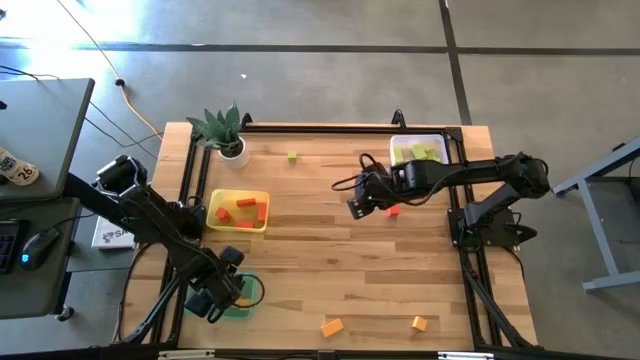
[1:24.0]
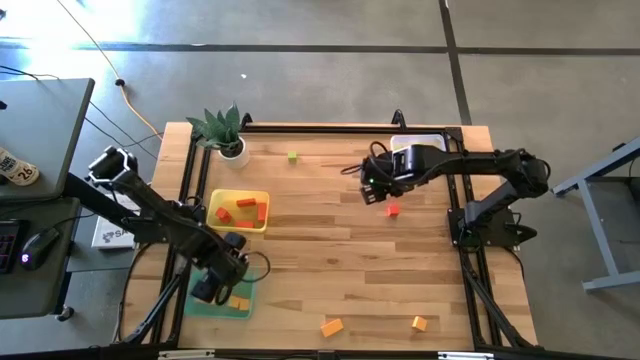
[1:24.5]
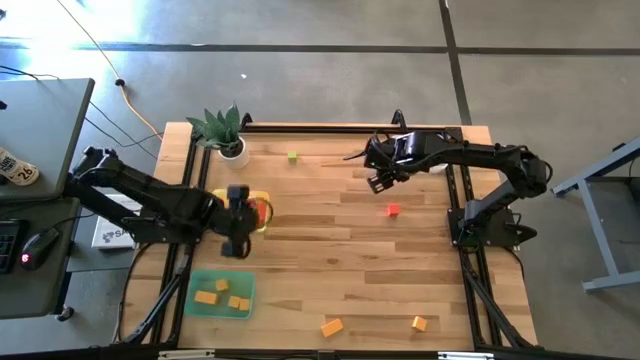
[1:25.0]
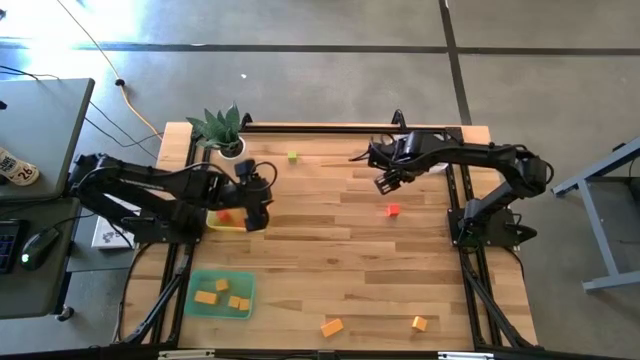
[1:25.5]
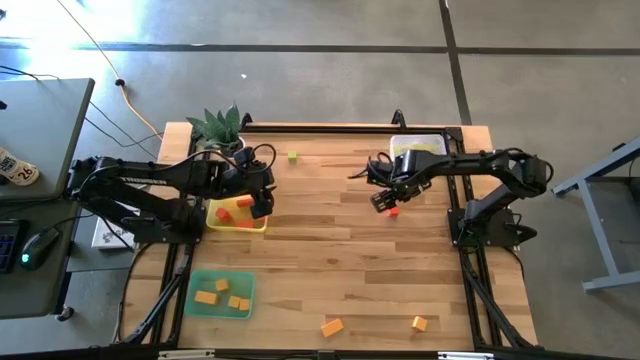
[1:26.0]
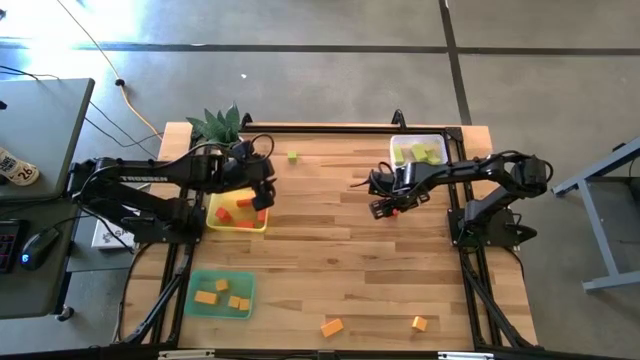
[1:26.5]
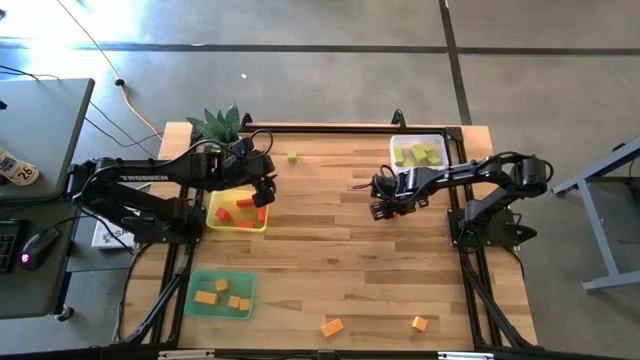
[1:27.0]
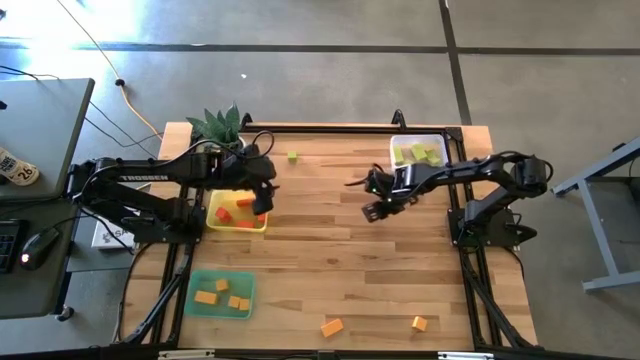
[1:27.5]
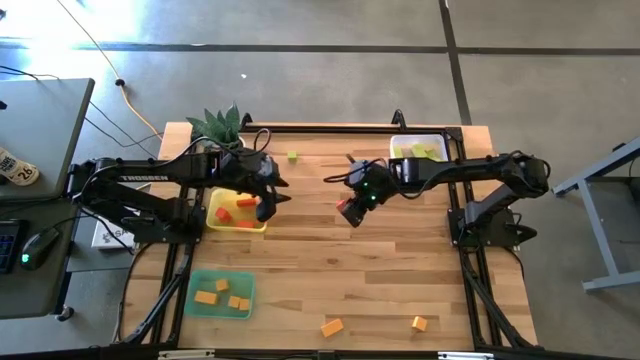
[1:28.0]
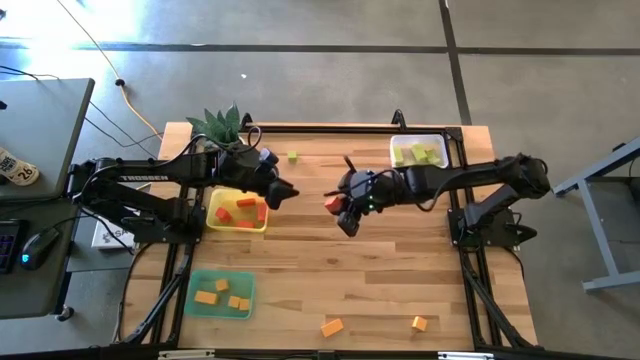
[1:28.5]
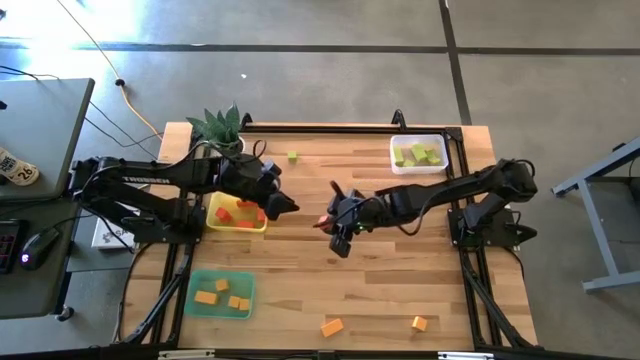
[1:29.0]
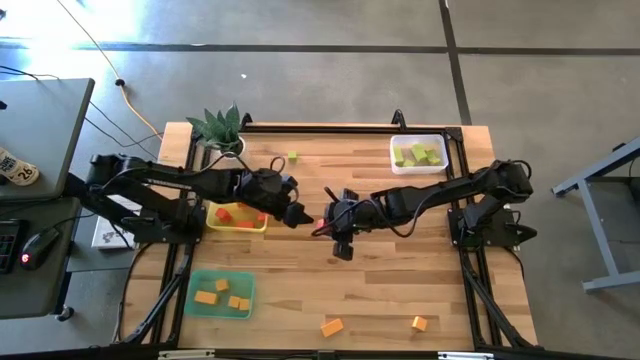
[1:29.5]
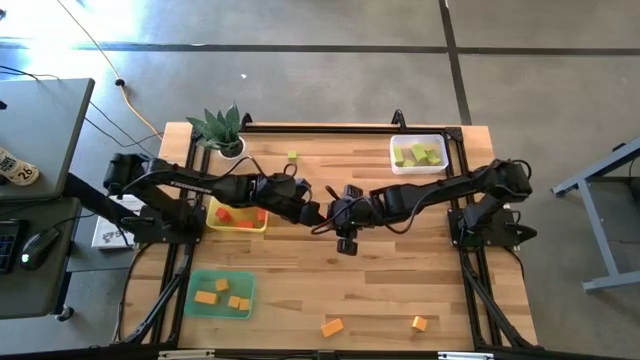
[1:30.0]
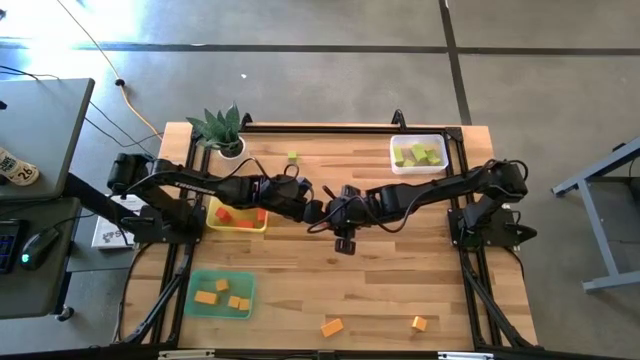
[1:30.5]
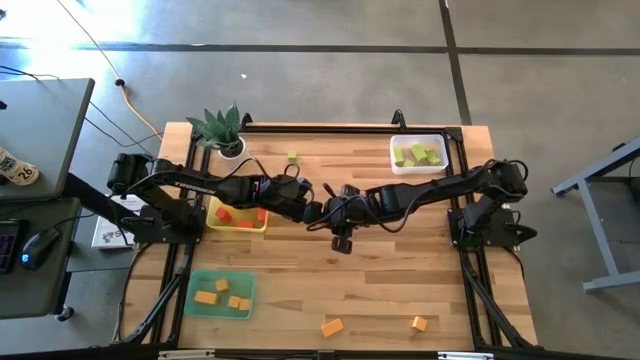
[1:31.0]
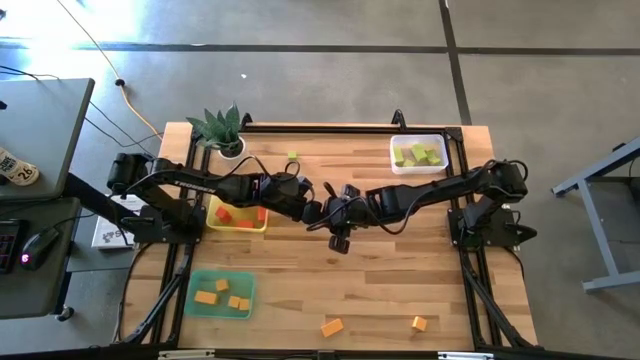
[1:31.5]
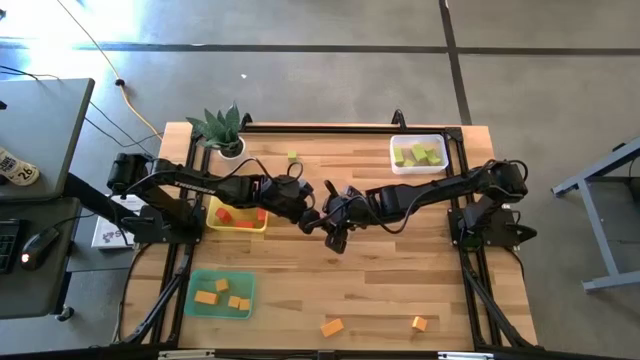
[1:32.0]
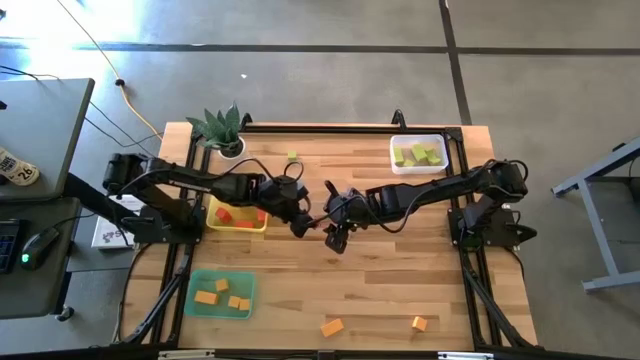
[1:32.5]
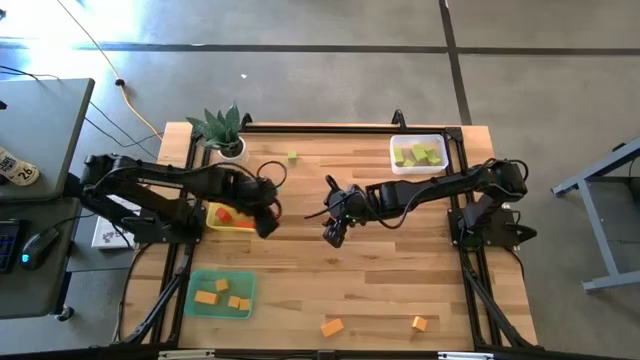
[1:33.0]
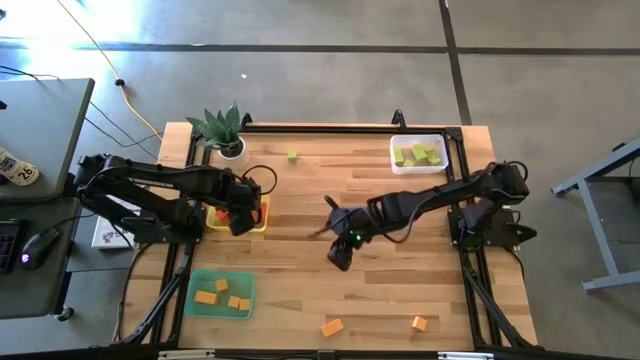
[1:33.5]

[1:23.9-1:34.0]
Task: Sort & place blocks by color
Put the orange block into the yellow bin

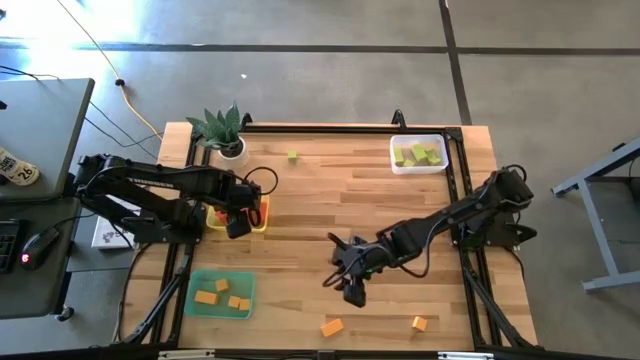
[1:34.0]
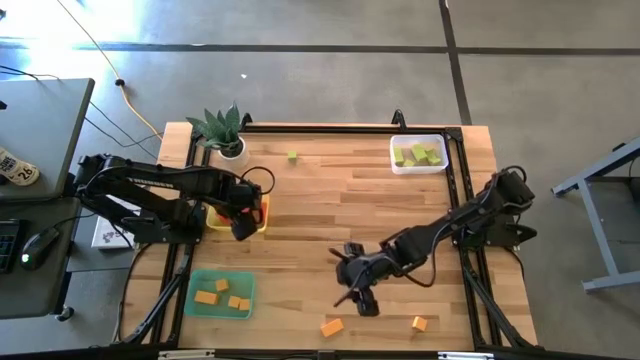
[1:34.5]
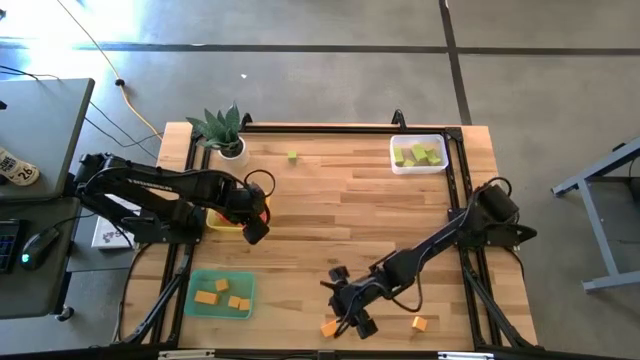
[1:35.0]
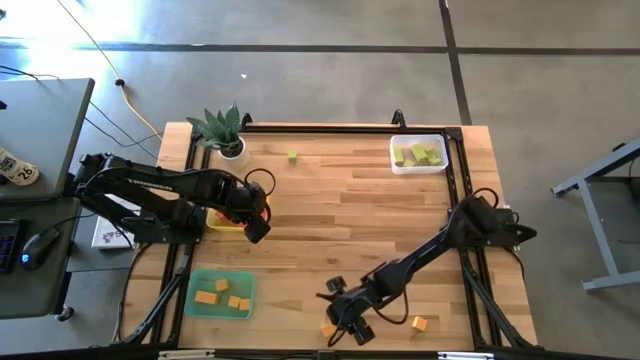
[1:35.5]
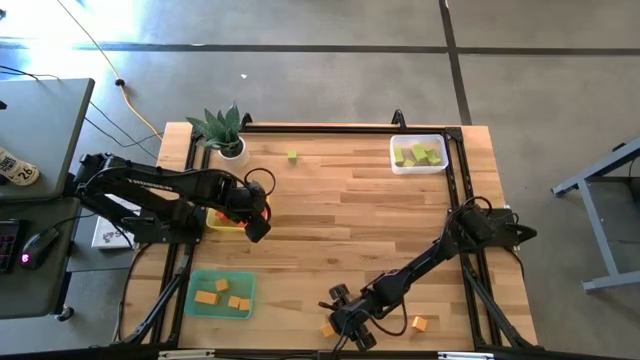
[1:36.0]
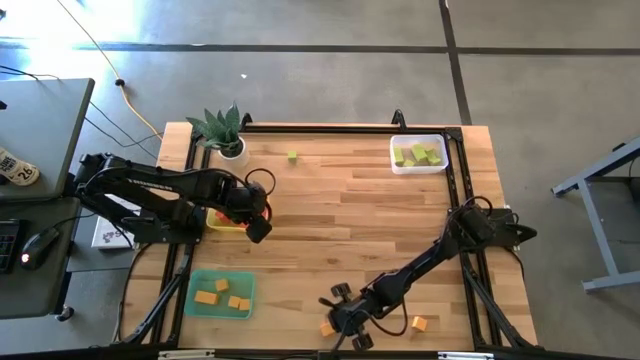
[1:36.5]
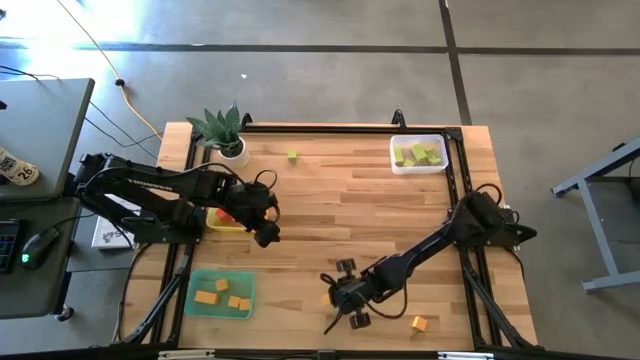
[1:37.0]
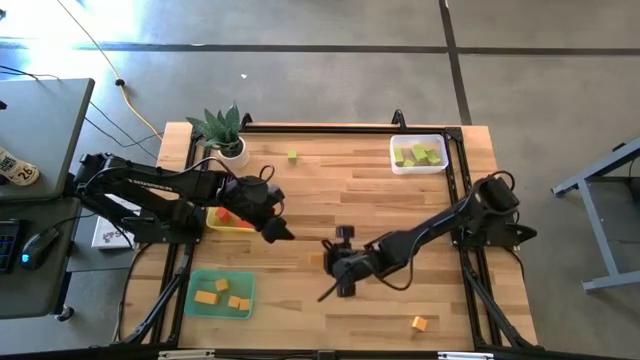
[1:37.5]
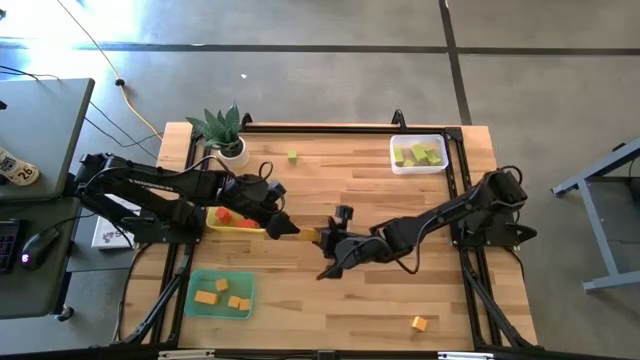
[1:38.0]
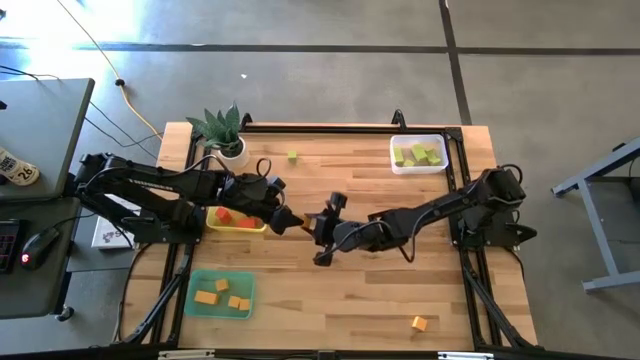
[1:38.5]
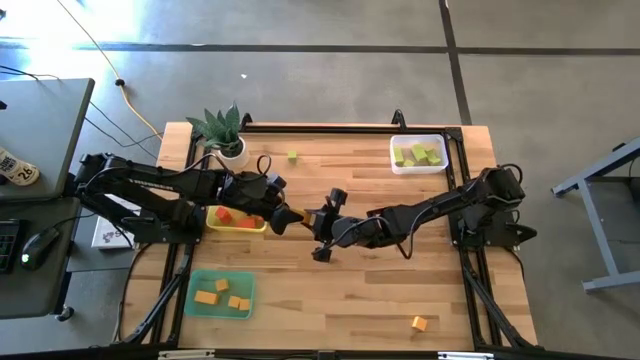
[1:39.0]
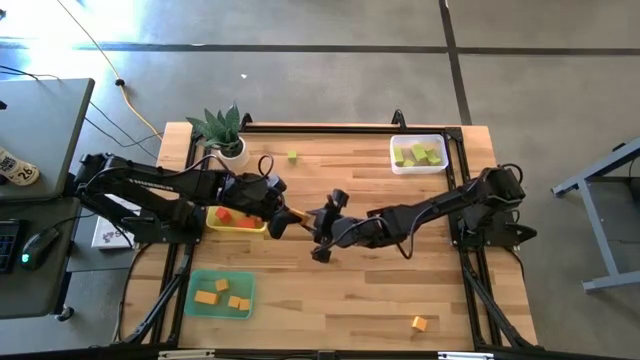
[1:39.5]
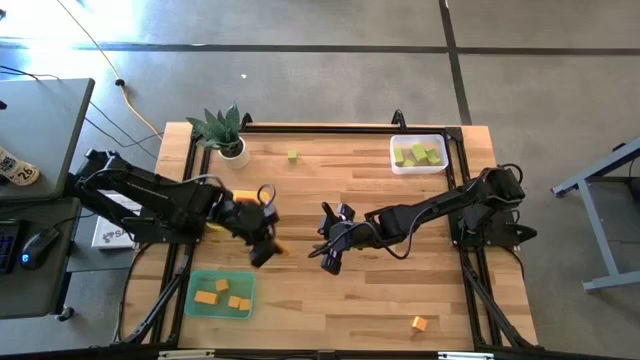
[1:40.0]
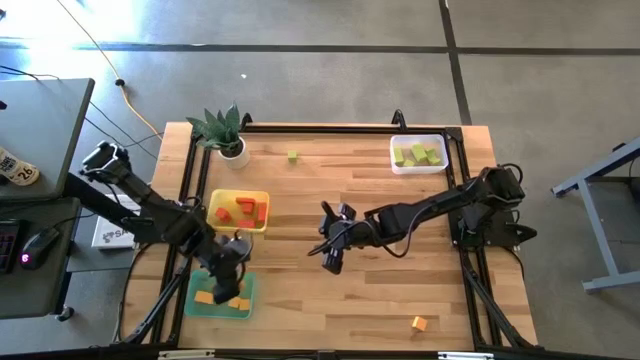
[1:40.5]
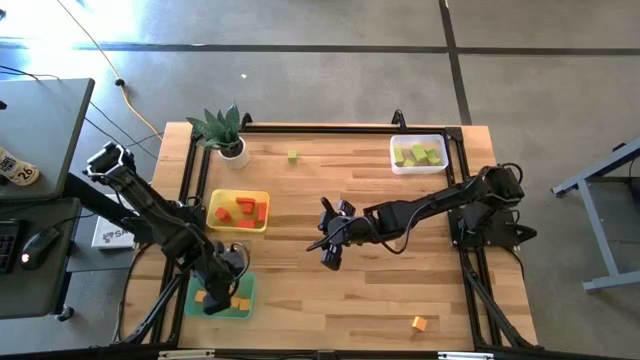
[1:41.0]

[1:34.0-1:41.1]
Put the yellow block into the green bin

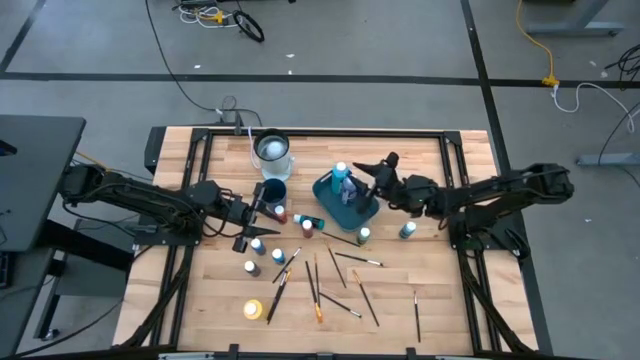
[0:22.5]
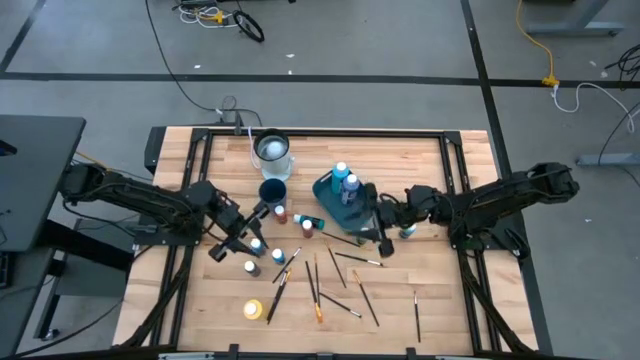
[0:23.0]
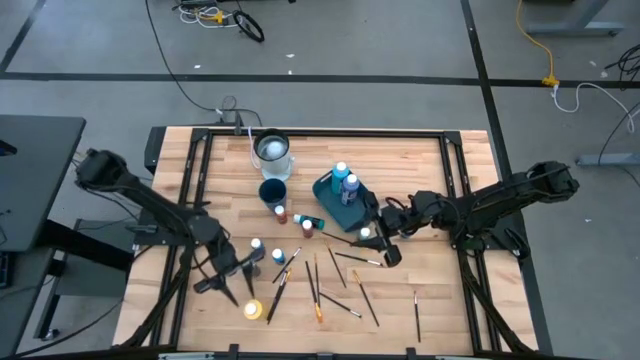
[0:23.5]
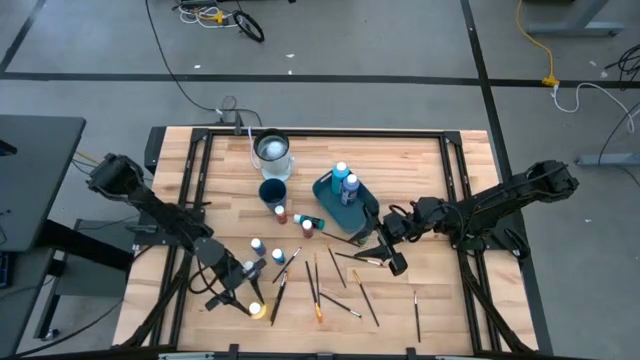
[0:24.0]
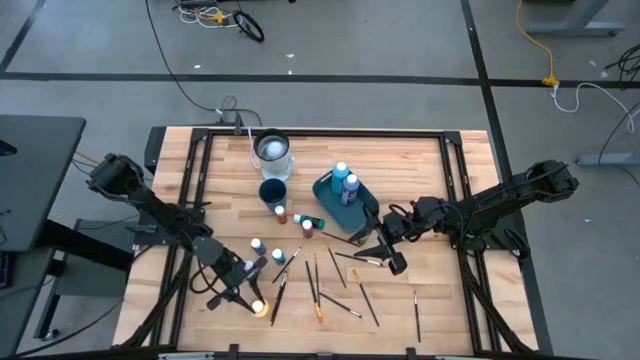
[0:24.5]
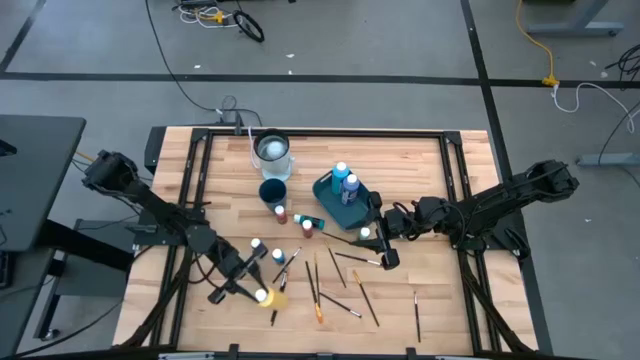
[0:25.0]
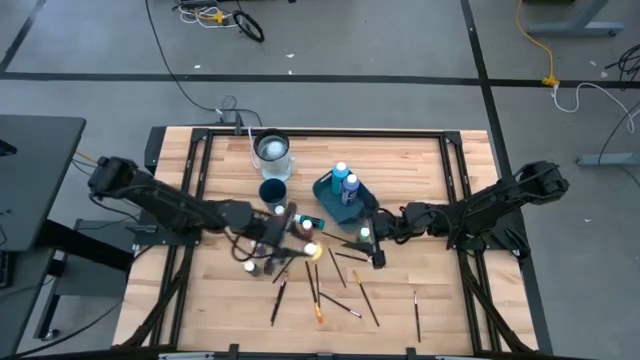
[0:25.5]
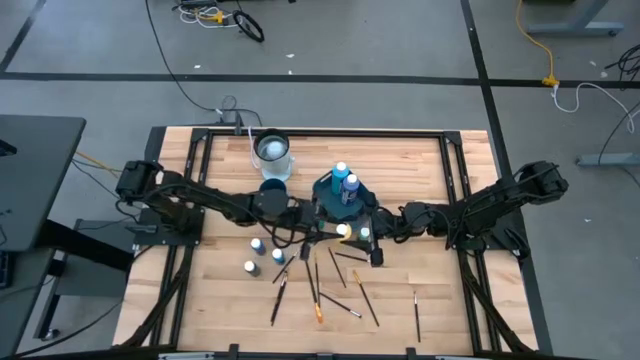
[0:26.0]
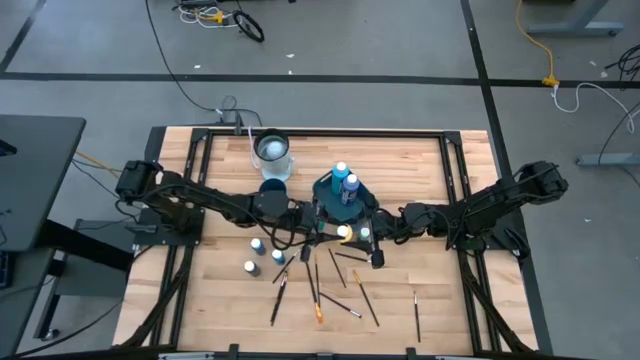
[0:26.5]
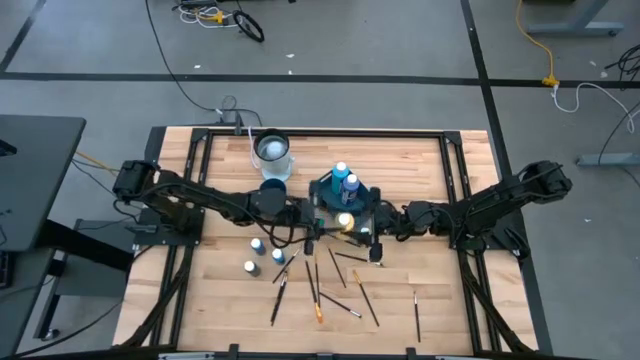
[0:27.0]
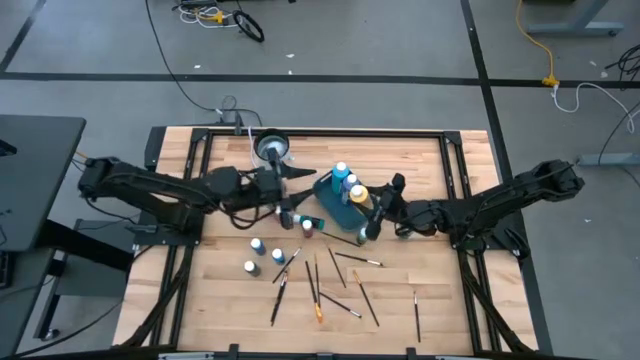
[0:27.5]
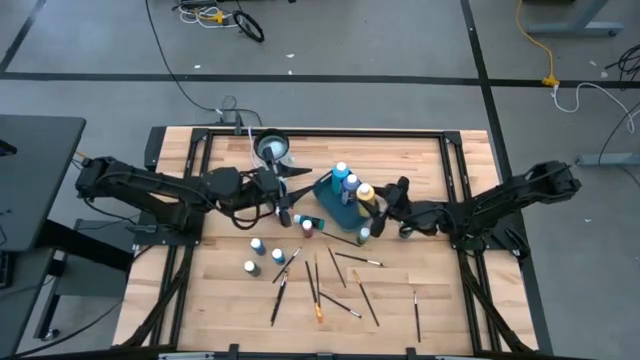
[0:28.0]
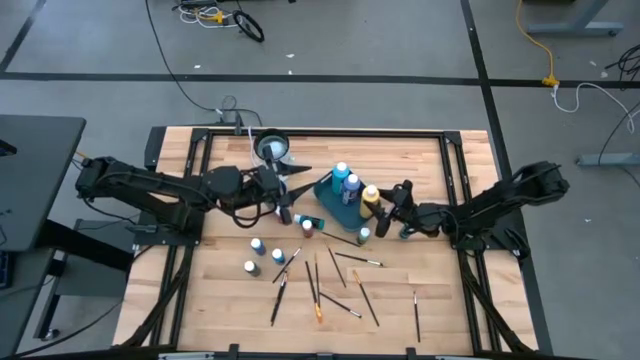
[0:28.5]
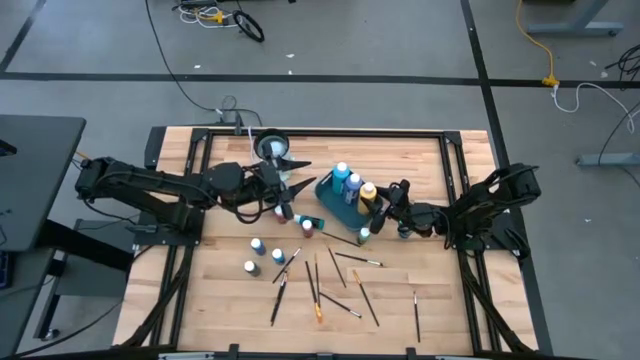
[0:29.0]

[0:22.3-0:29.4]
Task: Pick & Place Paint Supplies
Put the large yellow paint bottle into the blue bin
